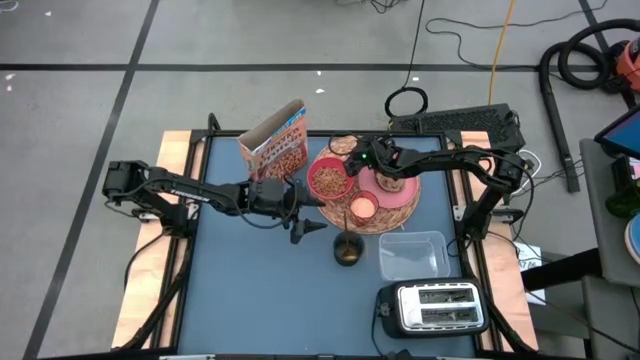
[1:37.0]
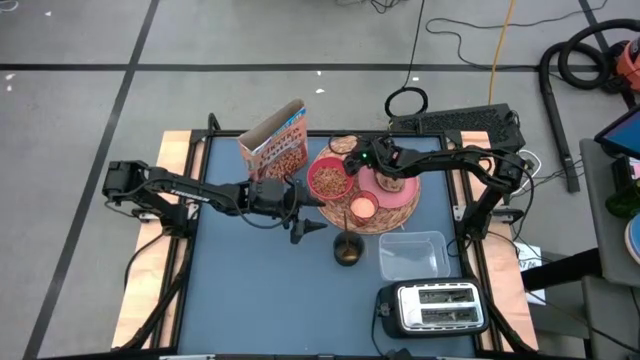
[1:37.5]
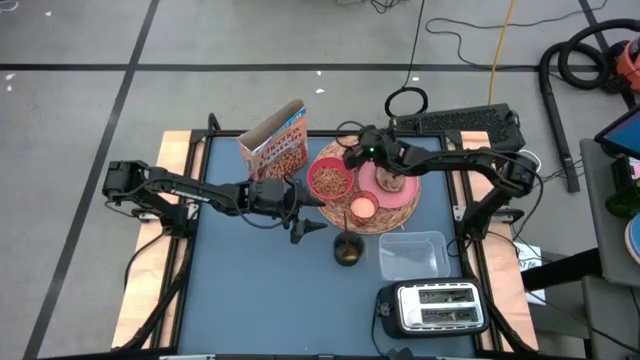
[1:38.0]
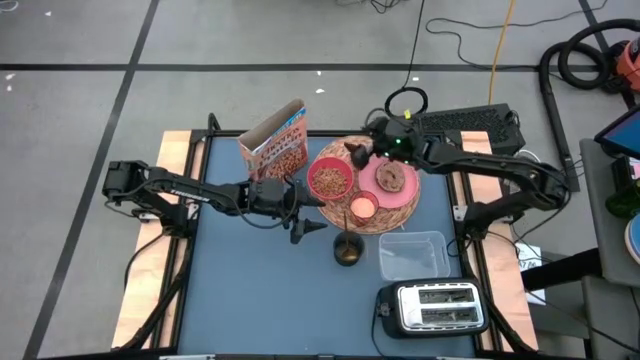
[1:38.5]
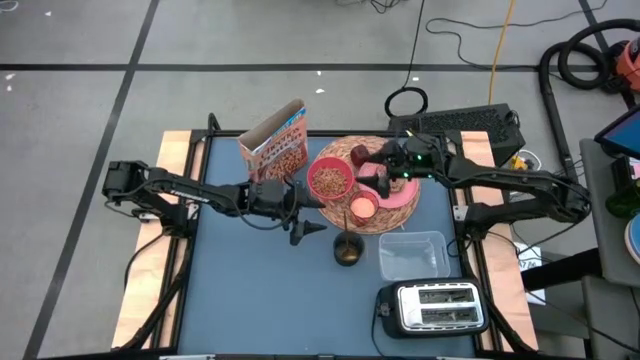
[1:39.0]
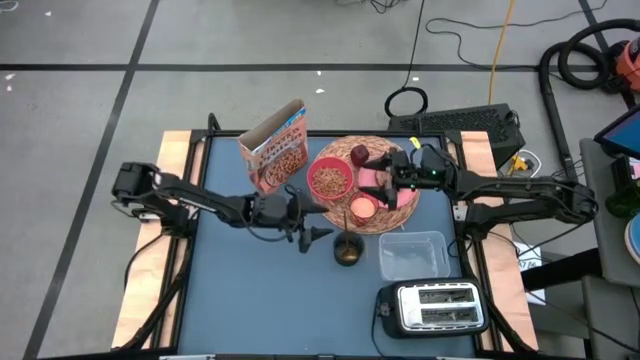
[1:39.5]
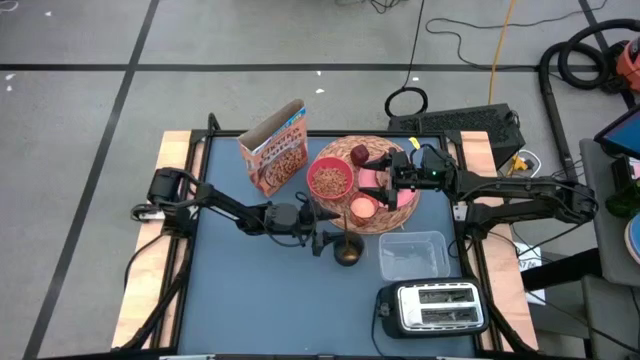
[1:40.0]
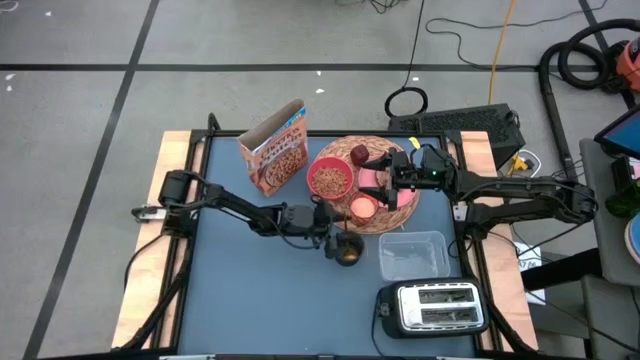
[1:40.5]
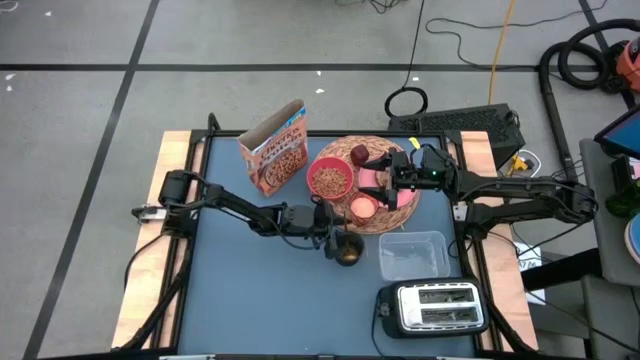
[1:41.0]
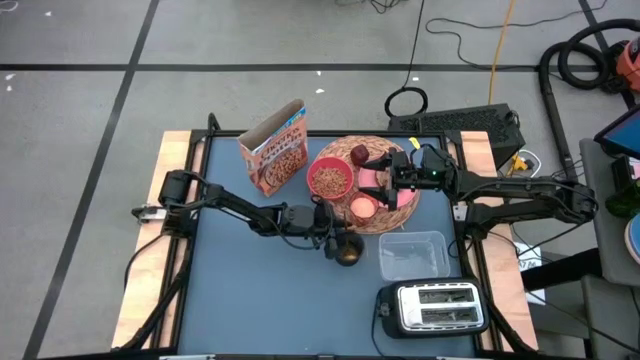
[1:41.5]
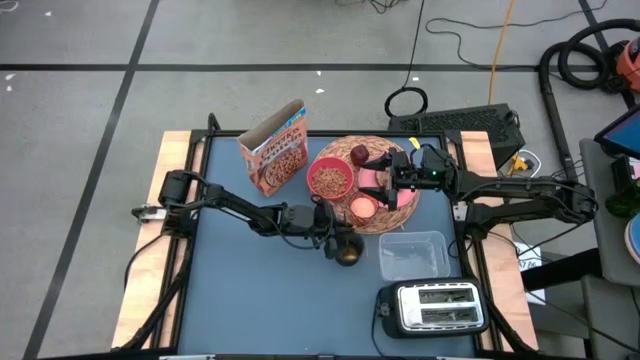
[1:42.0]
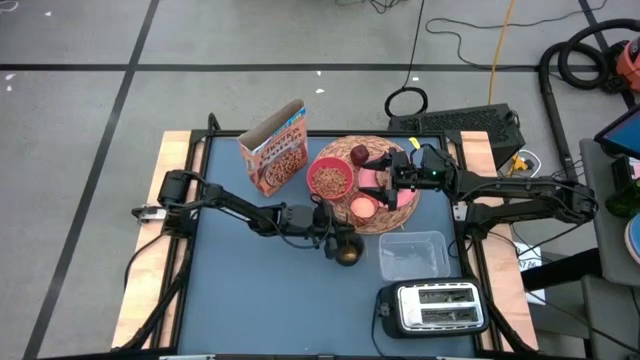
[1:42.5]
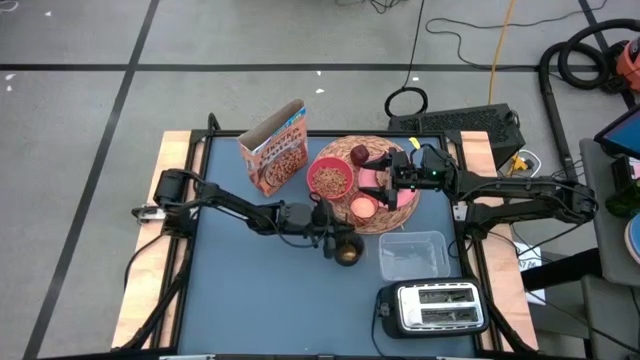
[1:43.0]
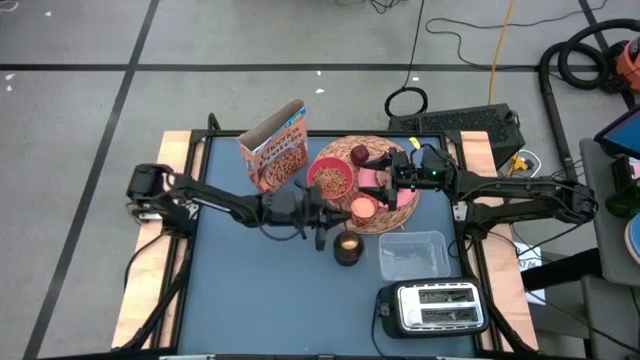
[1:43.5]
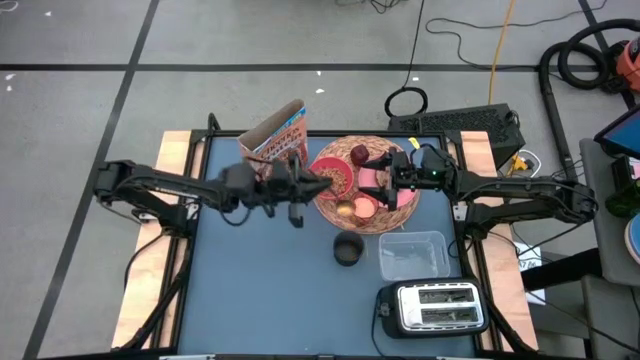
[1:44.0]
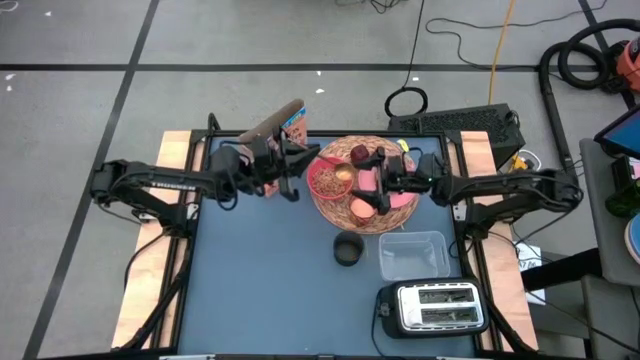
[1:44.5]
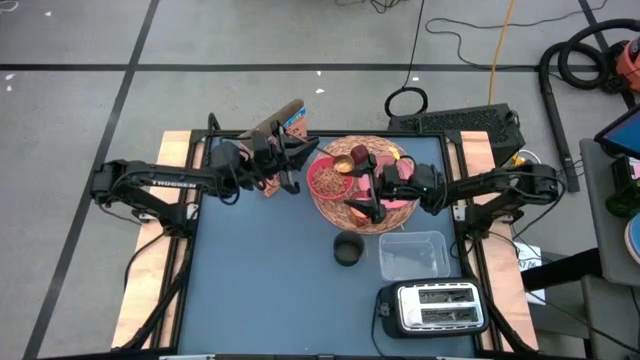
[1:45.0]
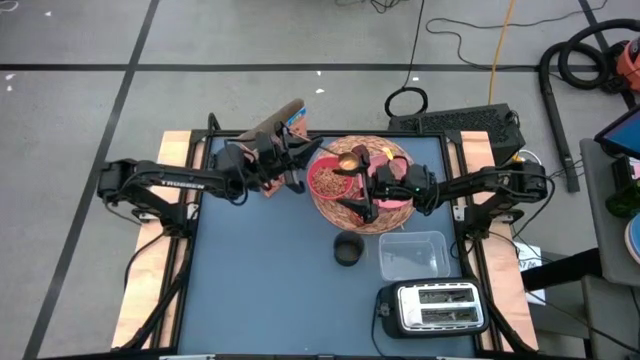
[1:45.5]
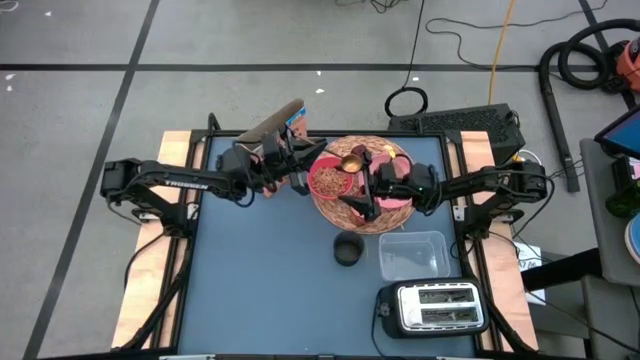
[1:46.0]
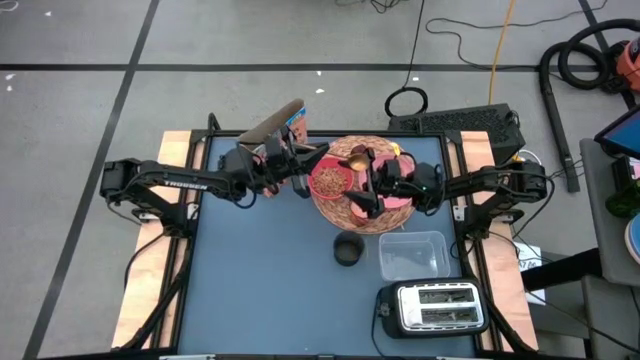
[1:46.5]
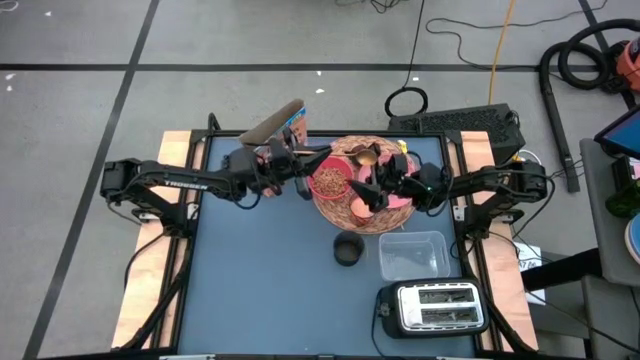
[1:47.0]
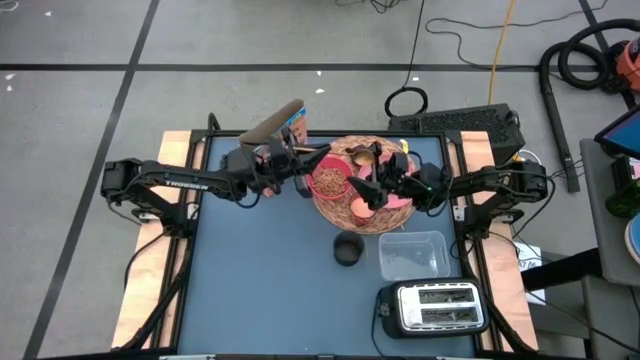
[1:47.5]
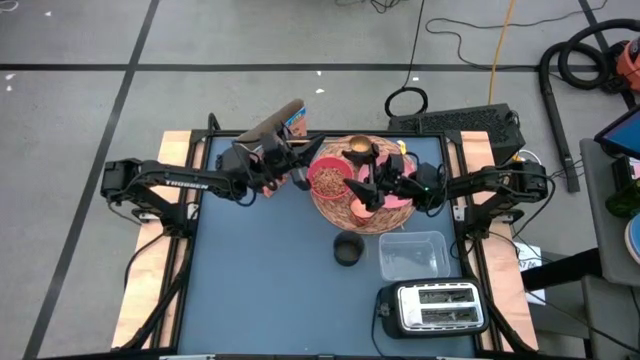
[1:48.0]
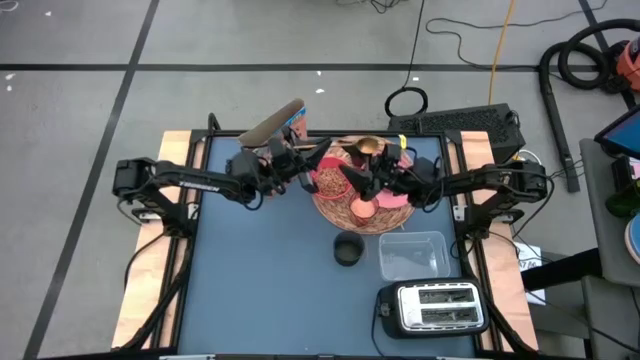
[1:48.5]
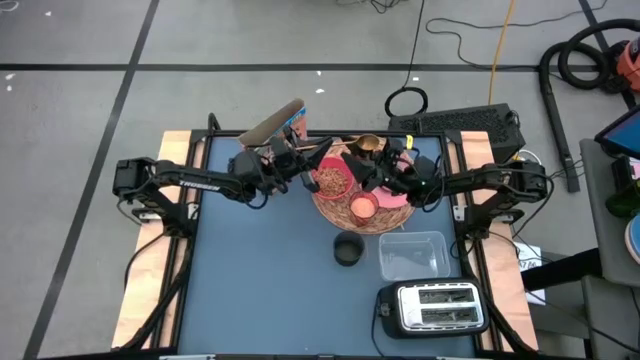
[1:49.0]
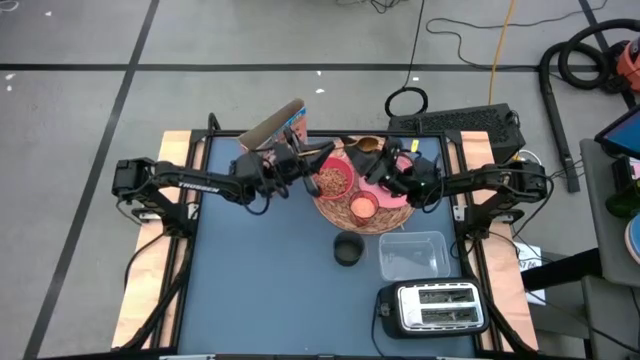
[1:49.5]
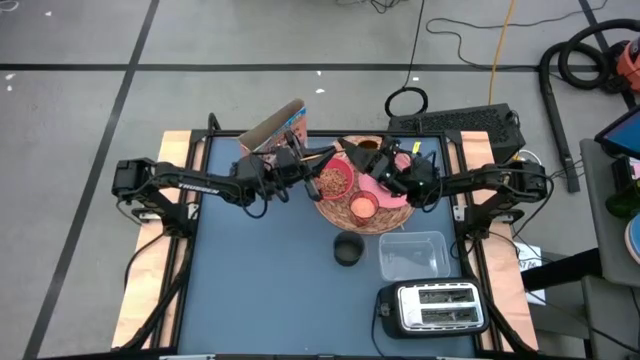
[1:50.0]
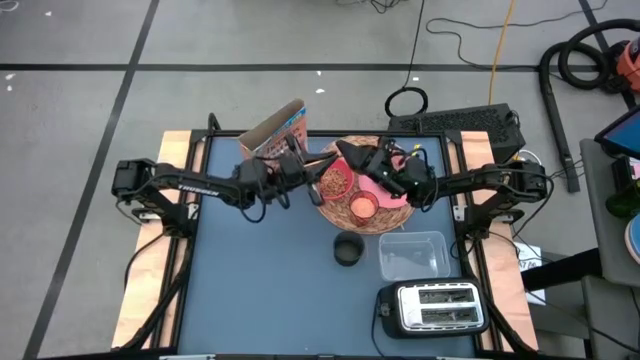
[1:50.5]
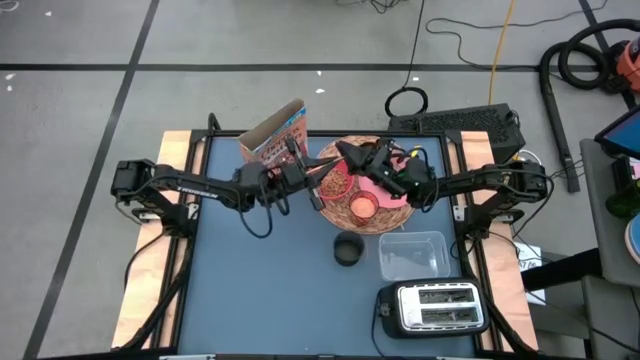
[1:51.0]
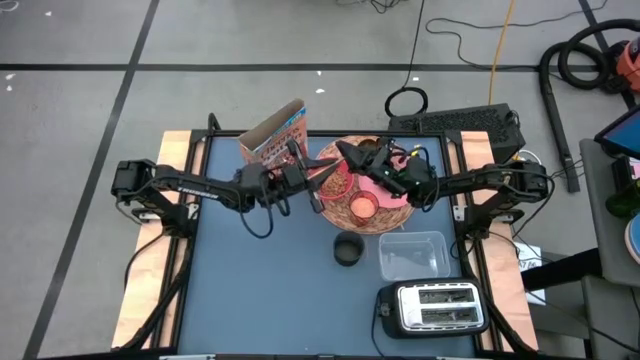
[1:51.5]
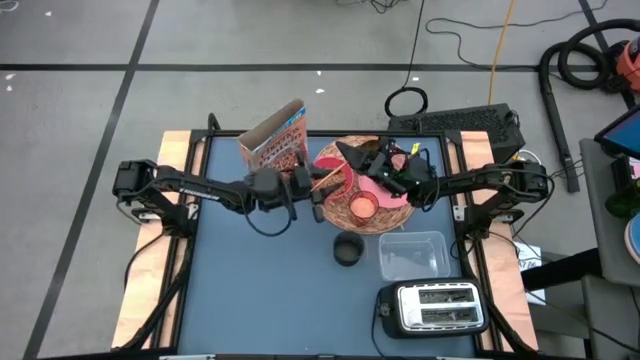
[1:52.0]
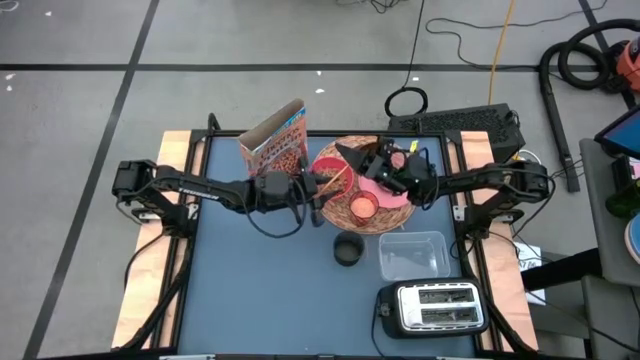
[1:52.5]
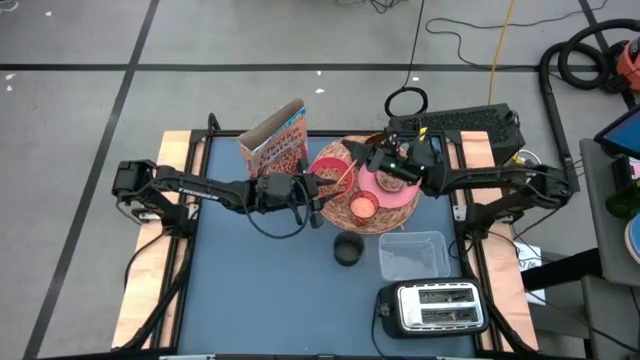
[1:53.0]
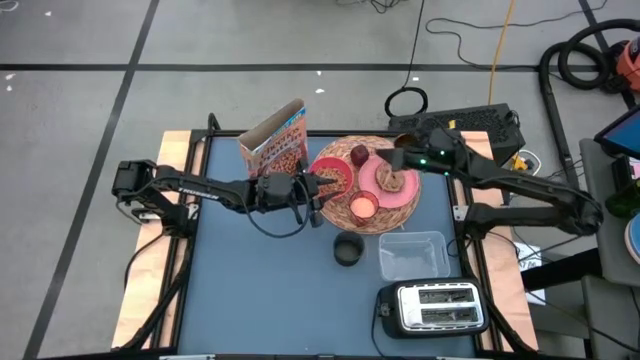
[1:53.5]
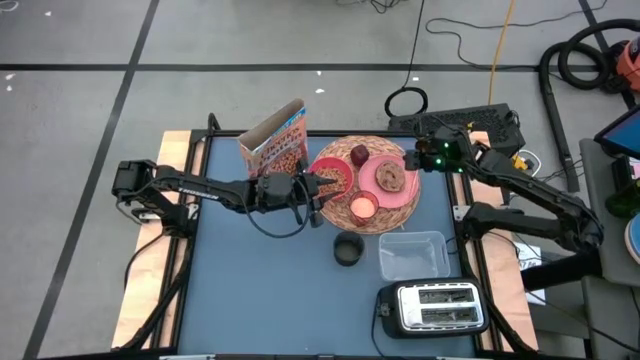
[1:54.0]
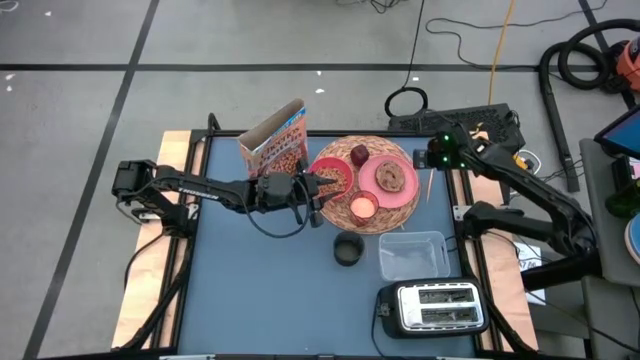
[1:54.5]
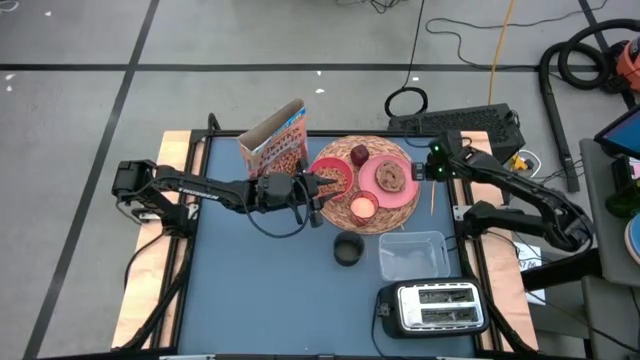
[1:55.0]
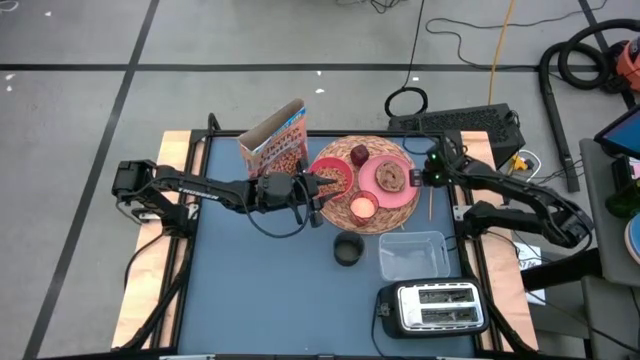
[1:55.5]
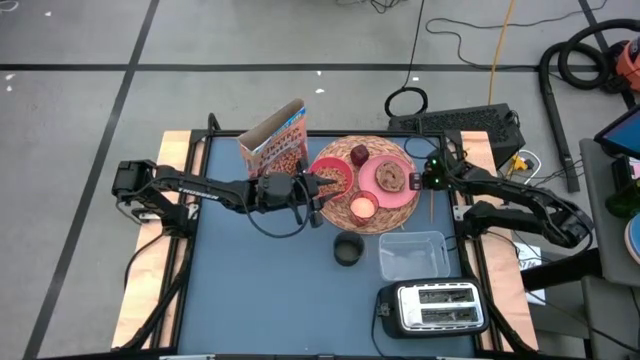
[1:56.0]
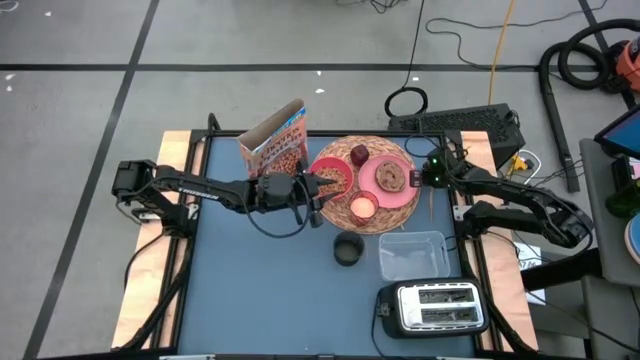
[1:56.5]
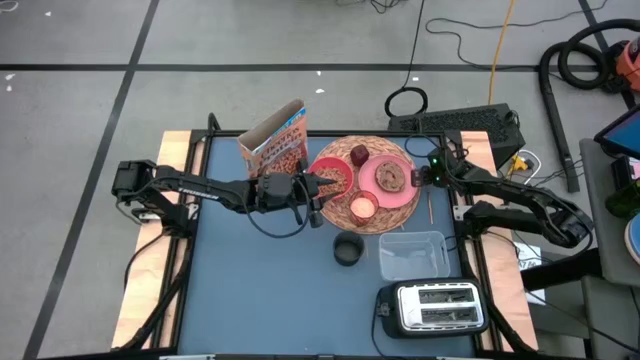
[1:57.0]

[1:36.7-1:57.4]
Task: Arrange a breakfast setting
Put the gold spoon to the right of the brown woven mat

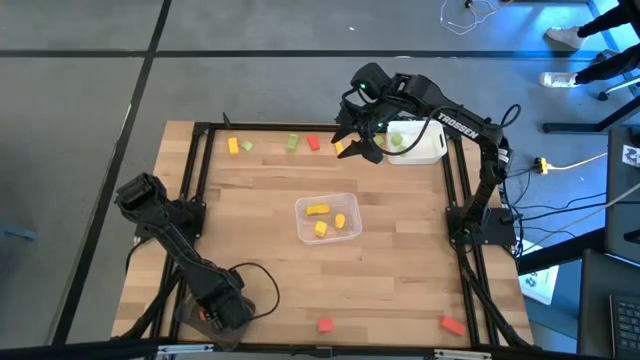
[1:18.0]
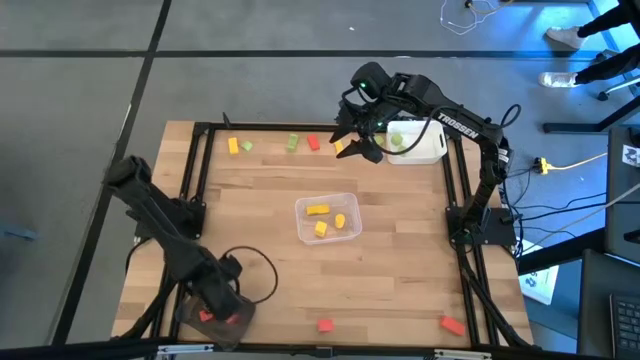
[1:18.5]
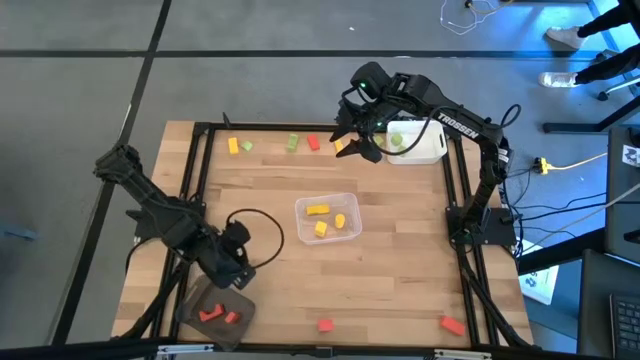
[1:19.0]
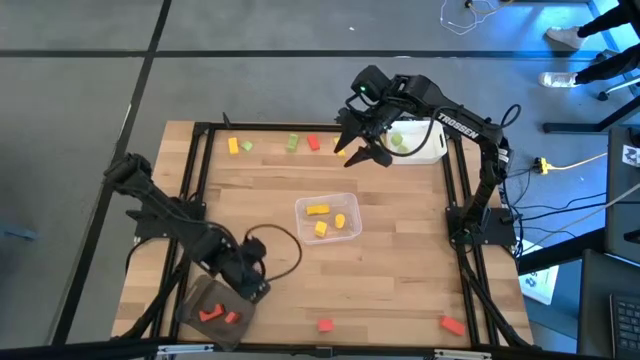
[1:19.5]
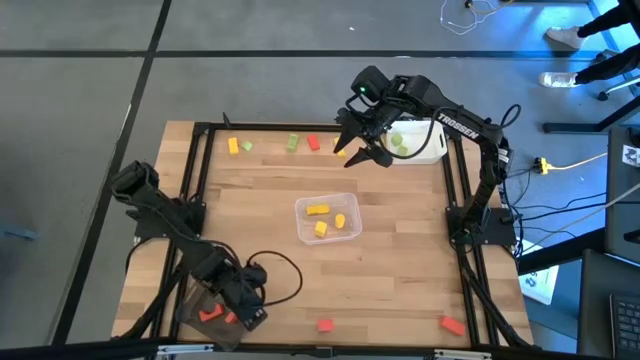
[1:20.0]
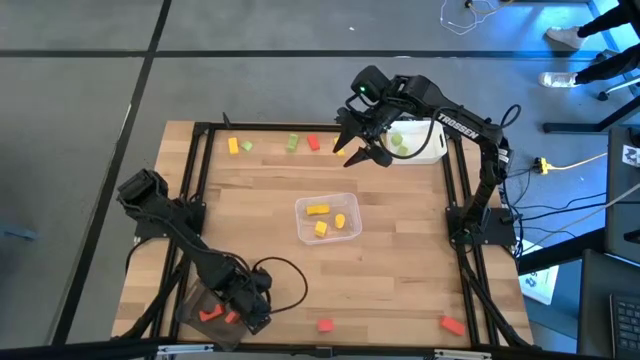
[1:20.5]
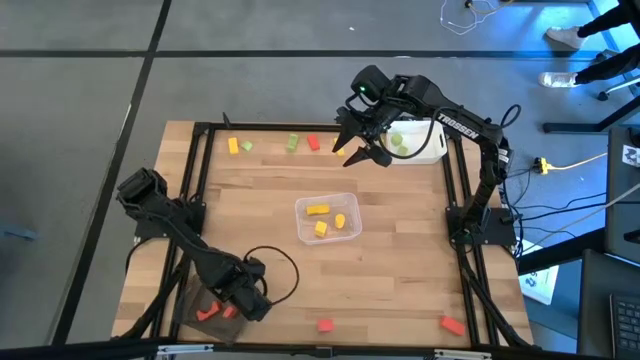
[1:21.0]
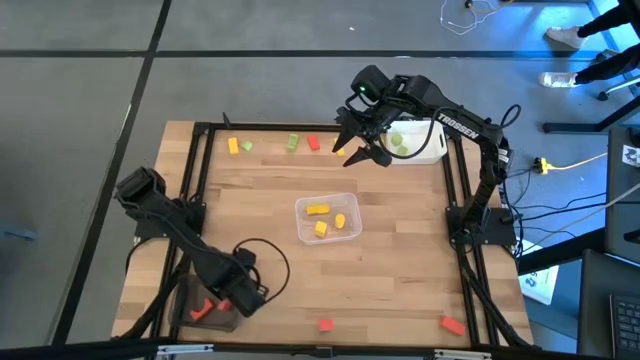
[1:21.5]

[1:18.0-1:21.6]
Task: Sort & place blocks by color
Adjust the black bin
